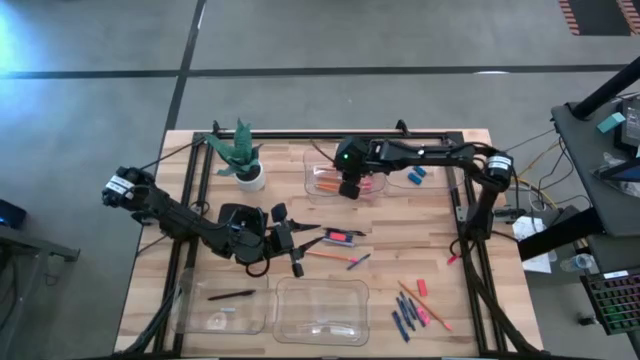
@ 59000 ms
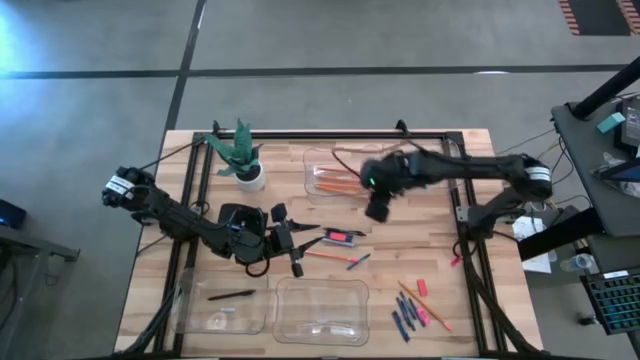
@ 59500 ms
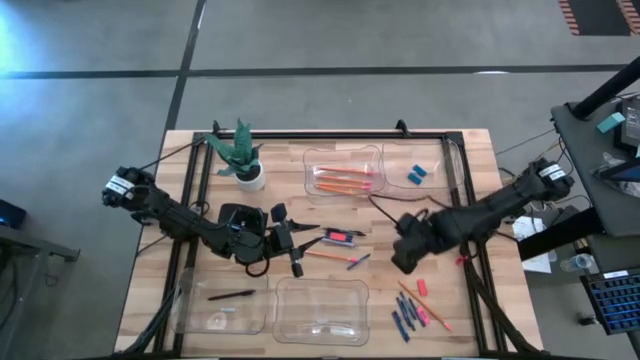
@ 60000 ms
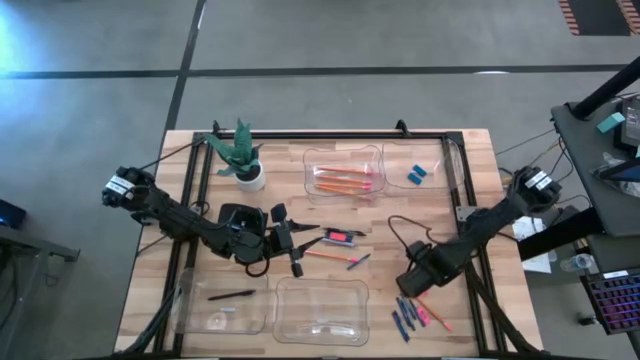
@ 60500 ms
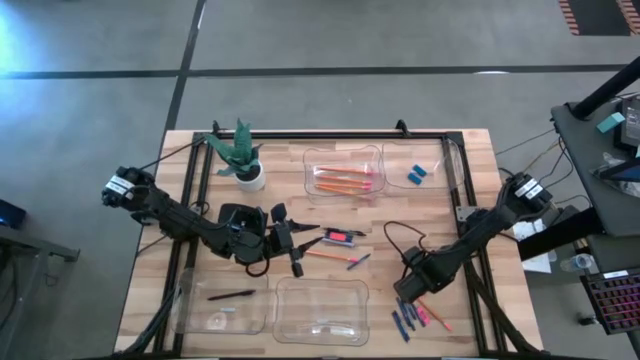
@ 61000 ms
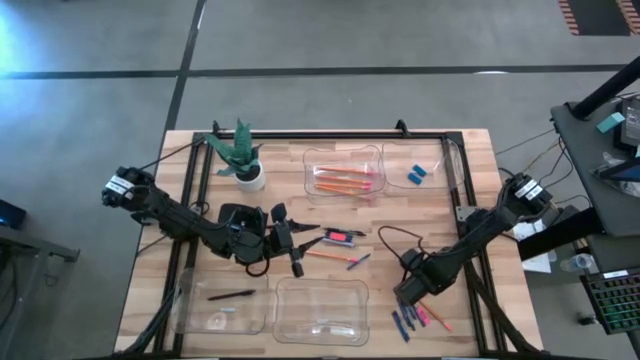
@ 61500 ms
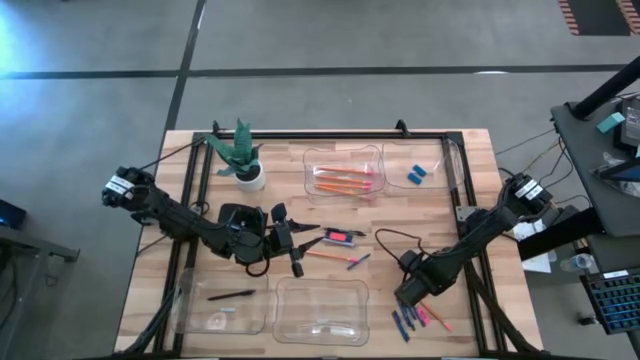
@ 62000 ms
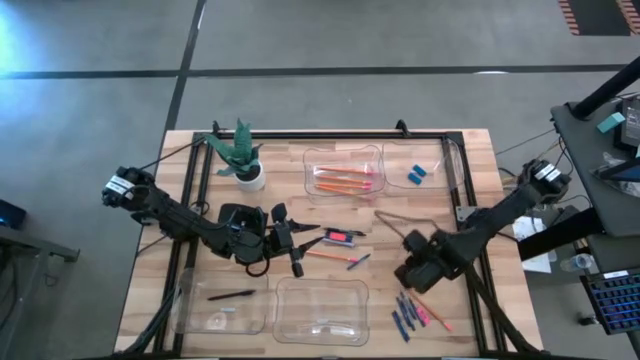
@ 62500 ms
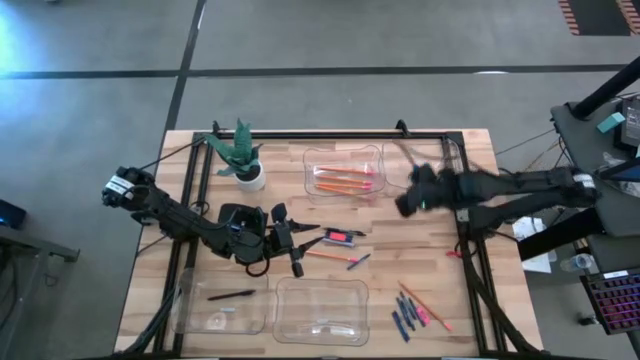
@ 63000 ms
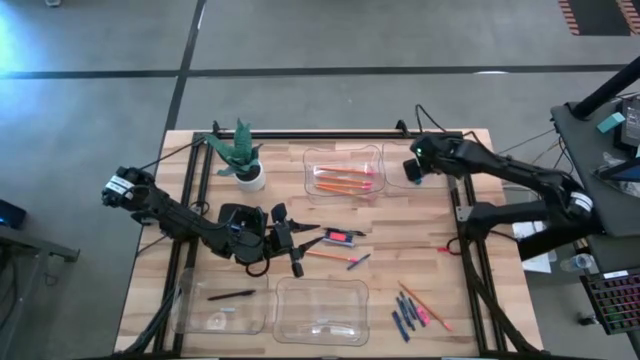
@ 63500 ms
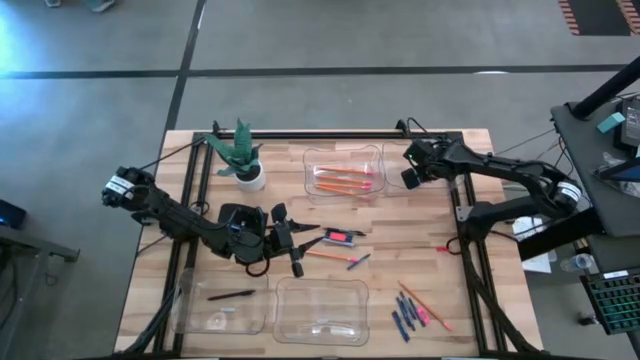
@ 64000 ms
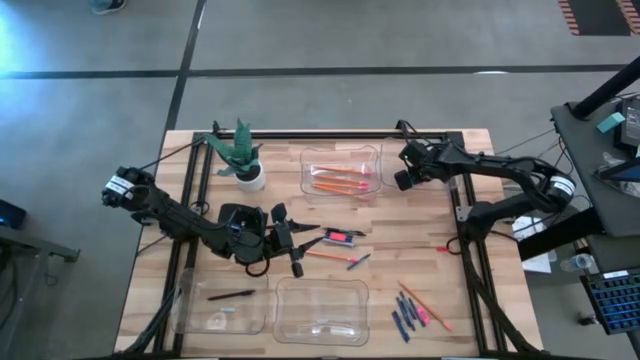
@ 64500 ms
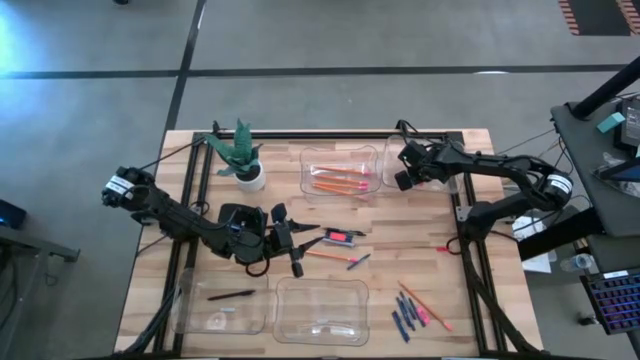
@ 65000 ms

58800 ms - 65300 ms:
Task: Sort crayons/erasers/pens/pencils in bins
Put the orange eraser into the top right transparent bin

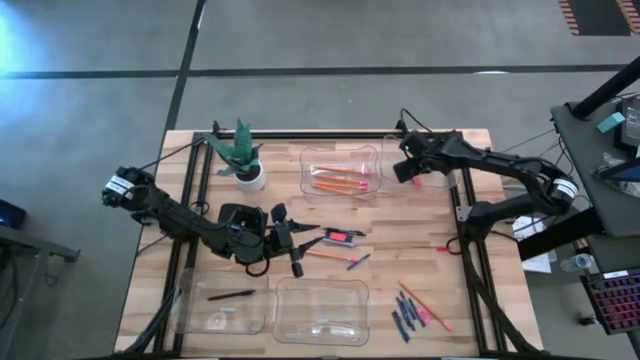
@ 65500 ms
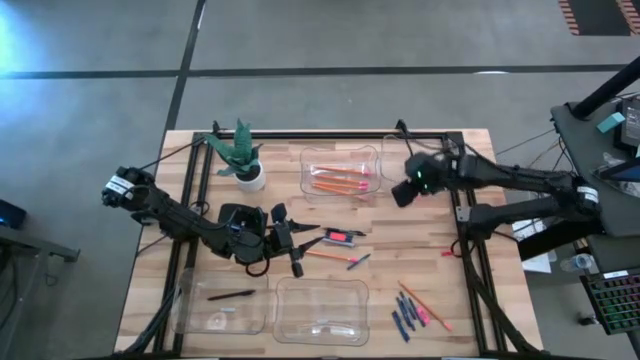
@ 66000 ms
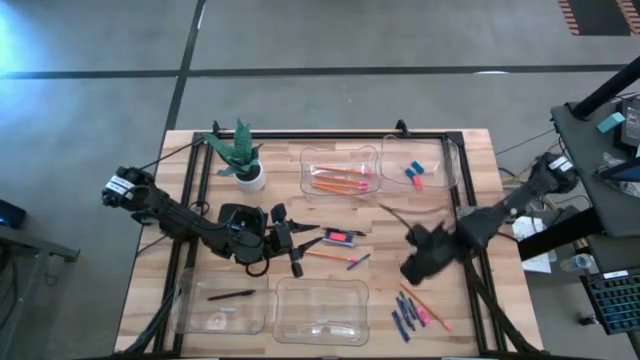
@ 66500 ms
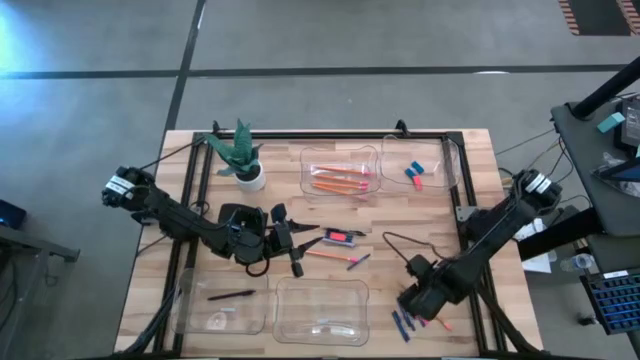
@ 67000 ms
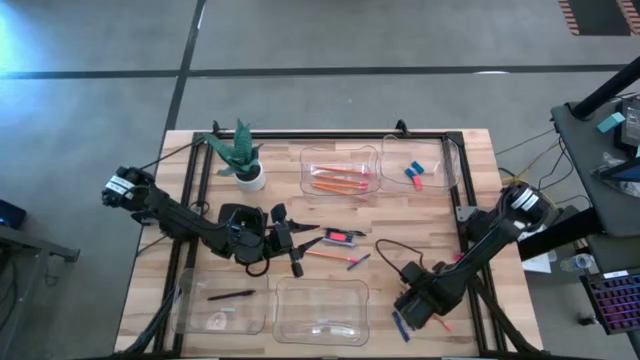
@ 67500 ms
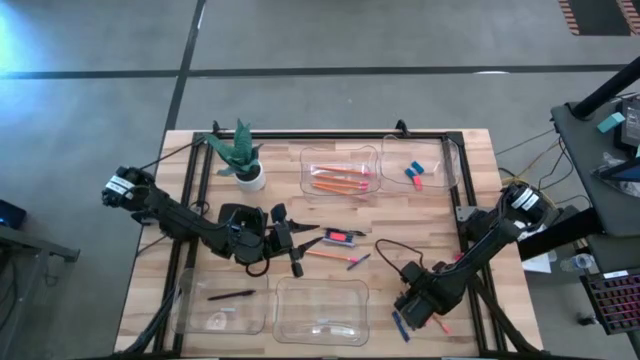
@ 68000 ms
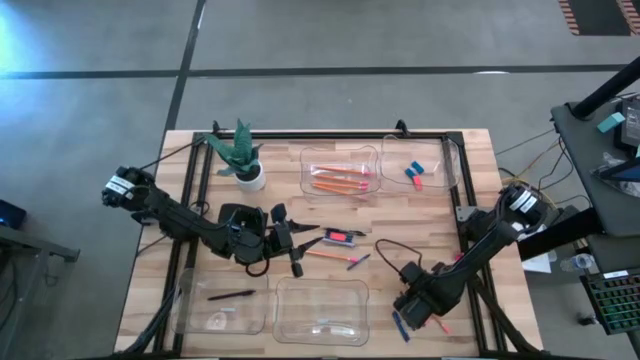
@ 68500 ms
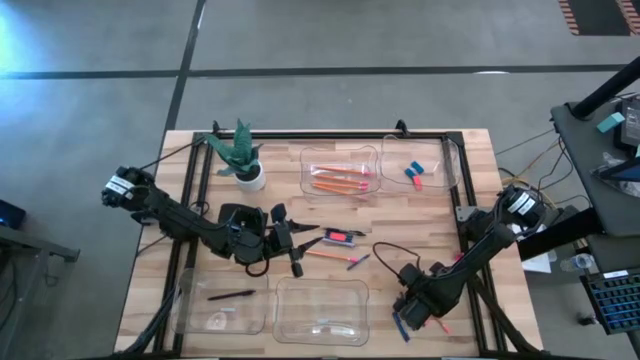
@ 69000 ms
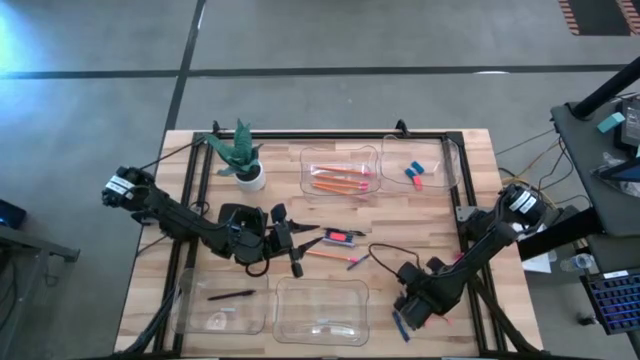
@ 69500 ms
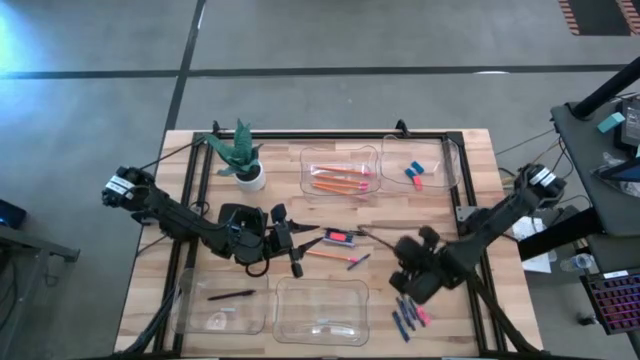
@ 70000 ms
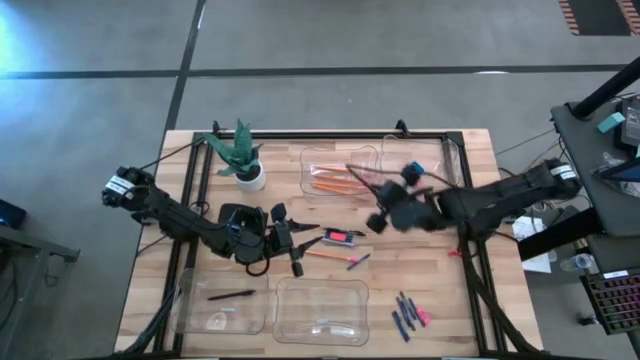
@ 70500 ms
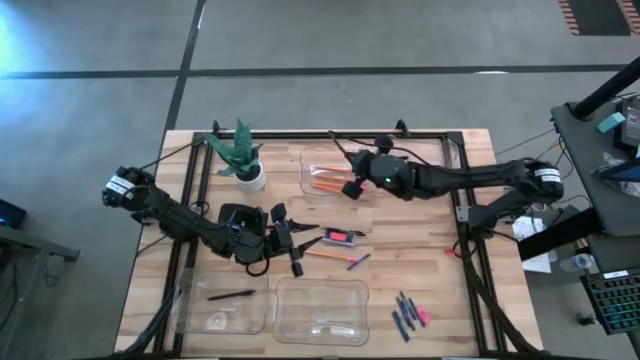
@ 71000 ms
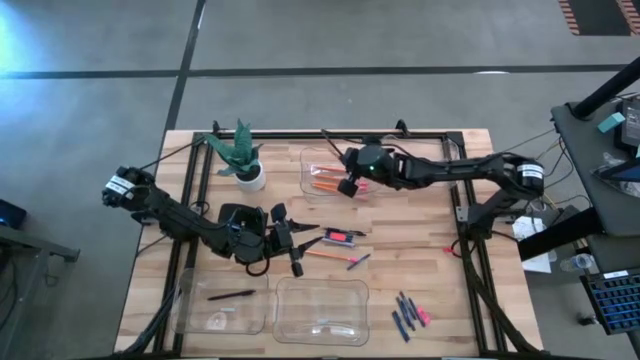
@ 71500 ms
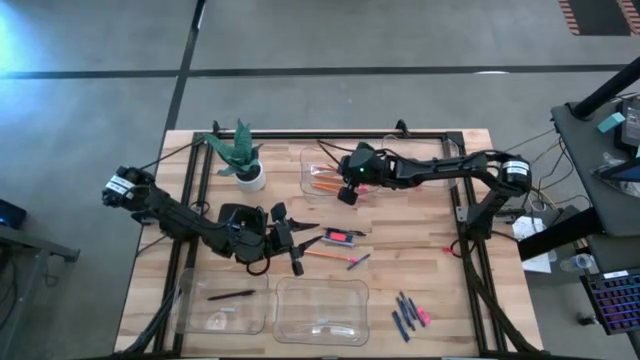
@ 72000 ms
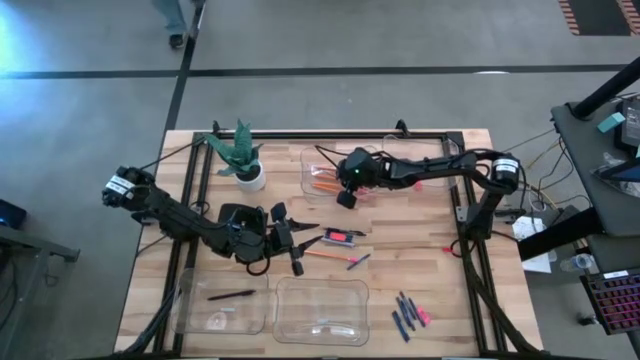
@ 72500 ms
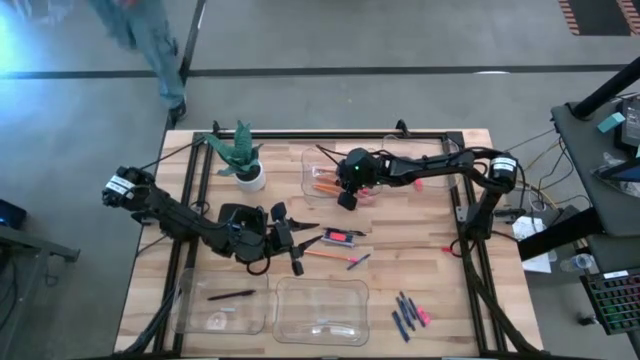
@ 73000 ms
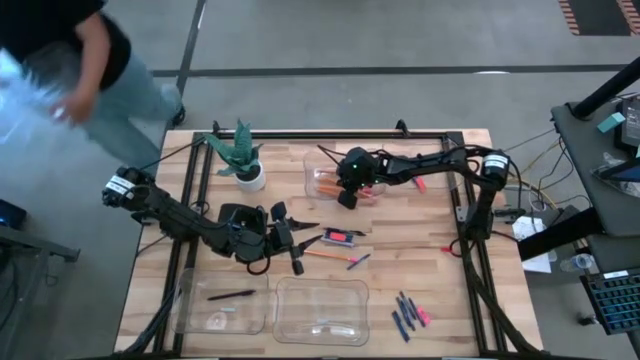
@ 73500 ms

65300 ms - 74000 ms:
Put the yellow pencil into the top left transparent bin

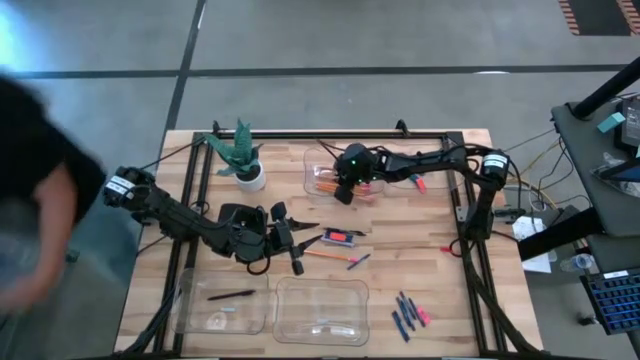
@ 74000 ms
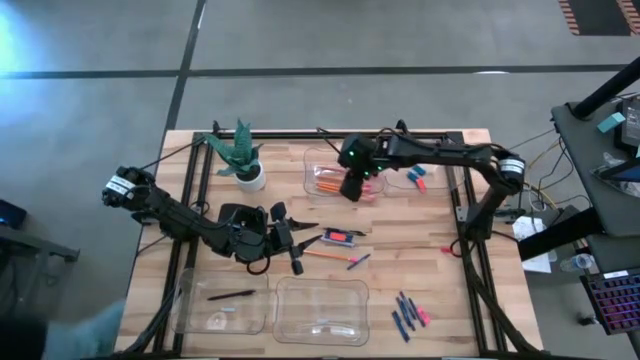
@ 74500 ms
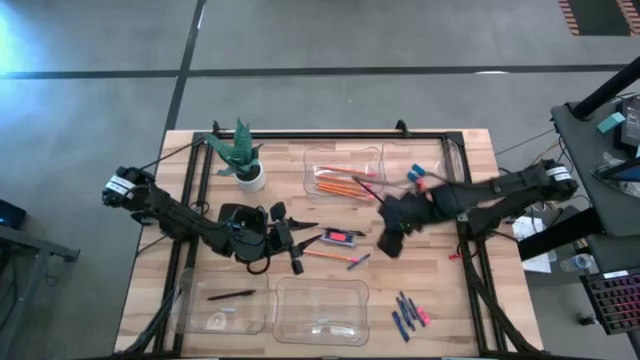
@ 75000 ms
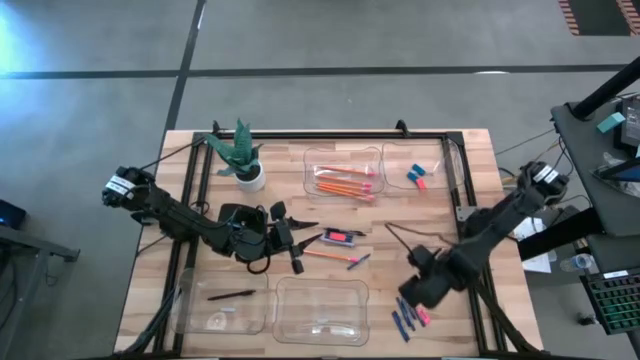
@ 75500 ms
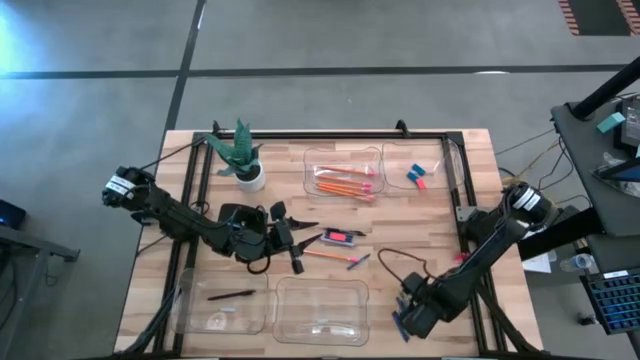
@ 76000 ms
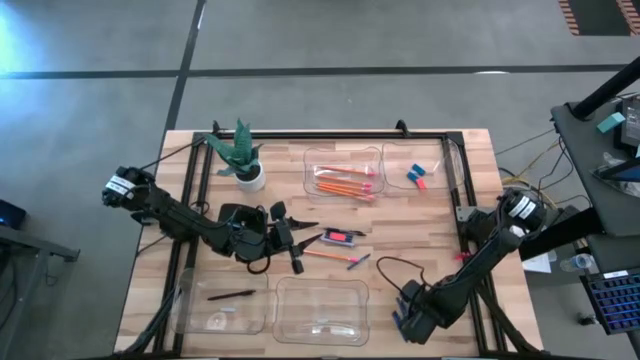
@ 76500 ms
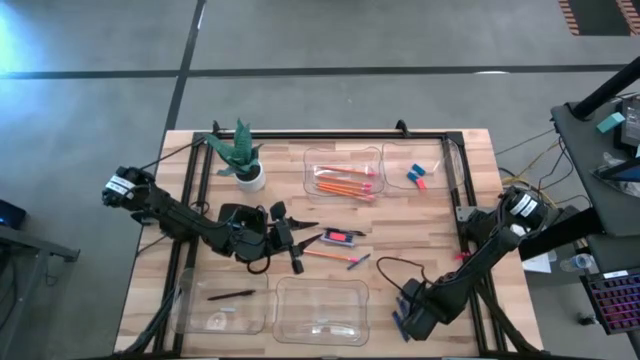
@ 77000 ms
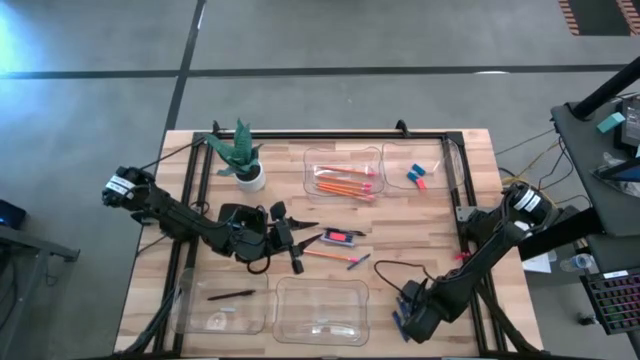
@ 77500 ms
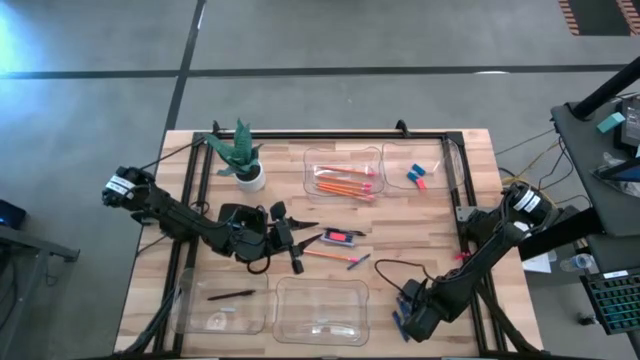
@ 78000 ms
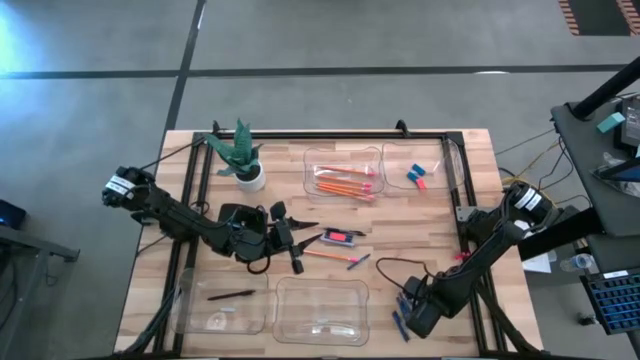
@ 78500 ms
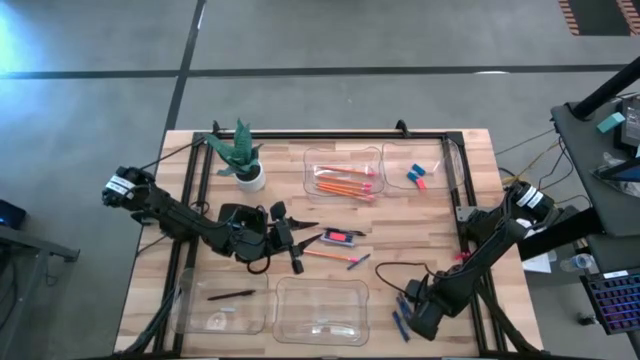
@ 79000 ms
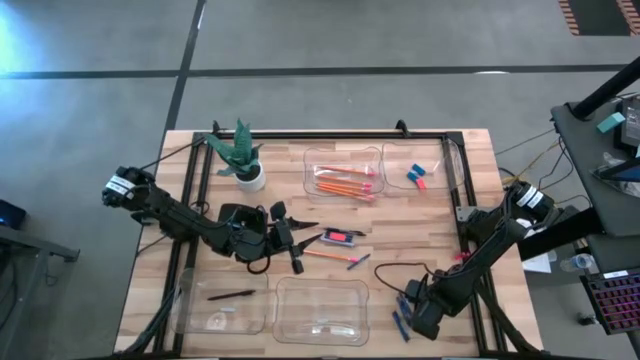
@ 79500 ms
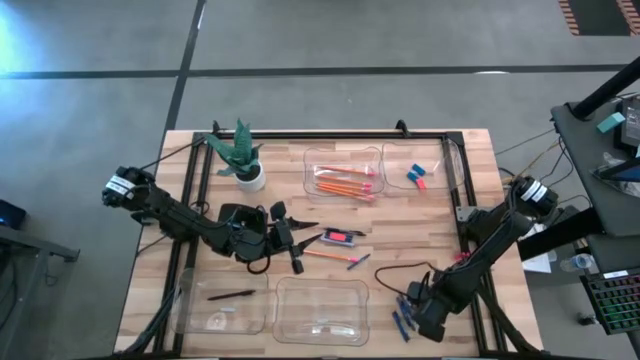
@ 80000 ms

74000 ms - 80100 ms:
Put the pink eraser into the top right transparent bin
